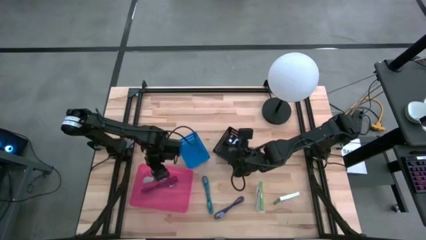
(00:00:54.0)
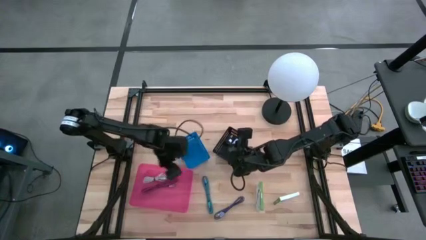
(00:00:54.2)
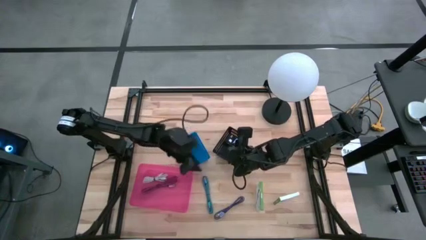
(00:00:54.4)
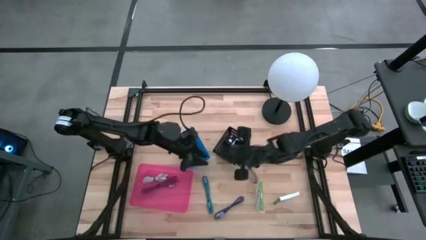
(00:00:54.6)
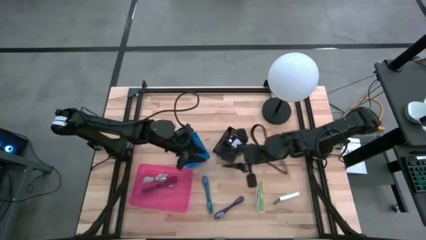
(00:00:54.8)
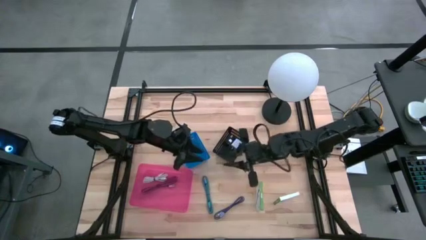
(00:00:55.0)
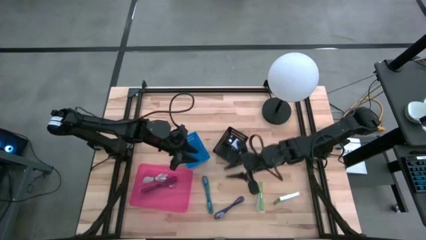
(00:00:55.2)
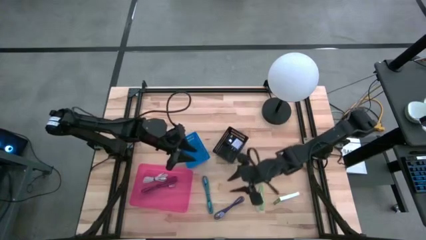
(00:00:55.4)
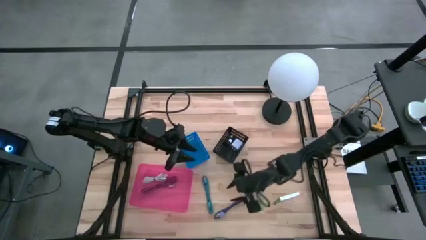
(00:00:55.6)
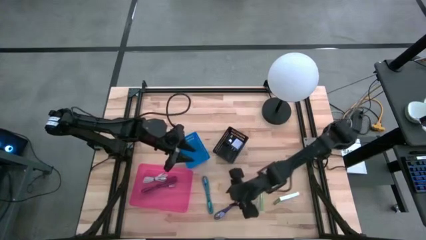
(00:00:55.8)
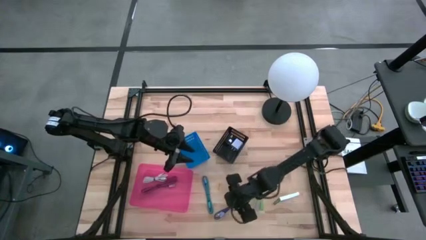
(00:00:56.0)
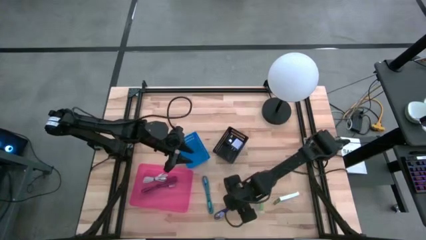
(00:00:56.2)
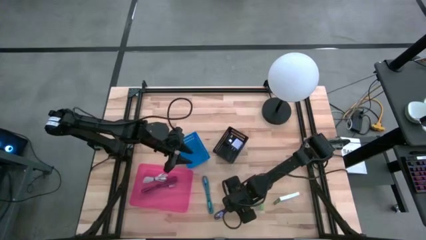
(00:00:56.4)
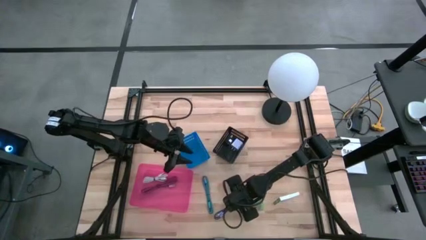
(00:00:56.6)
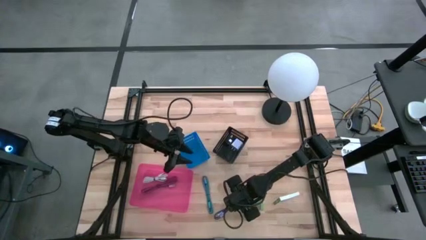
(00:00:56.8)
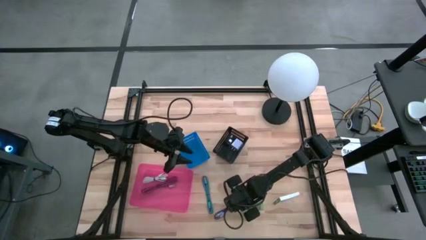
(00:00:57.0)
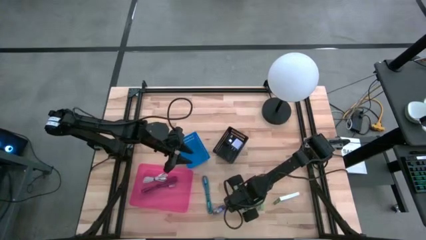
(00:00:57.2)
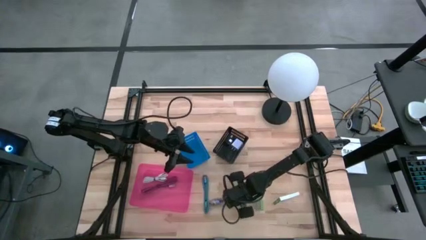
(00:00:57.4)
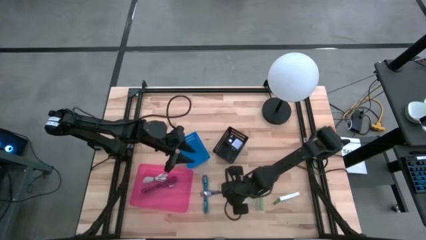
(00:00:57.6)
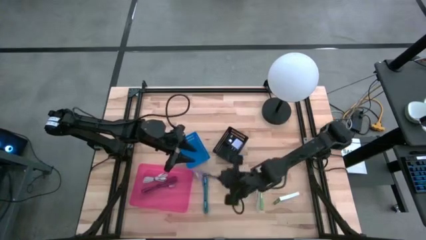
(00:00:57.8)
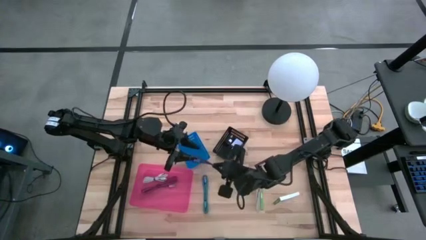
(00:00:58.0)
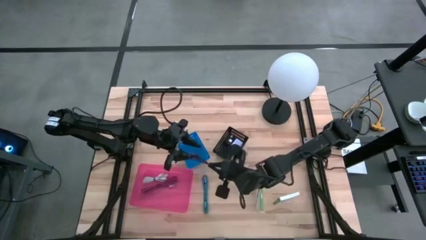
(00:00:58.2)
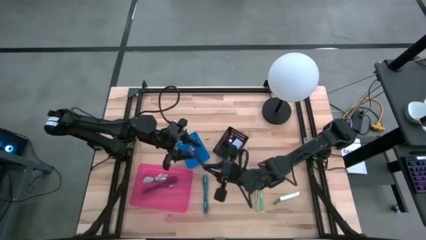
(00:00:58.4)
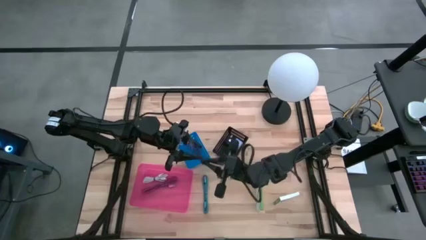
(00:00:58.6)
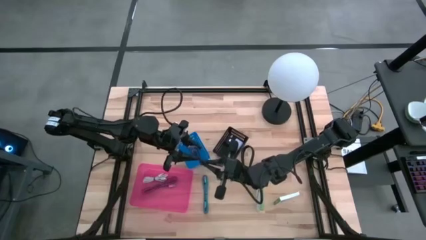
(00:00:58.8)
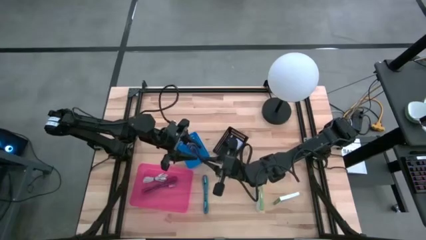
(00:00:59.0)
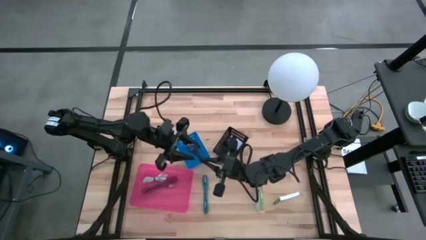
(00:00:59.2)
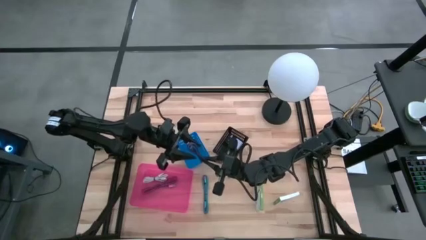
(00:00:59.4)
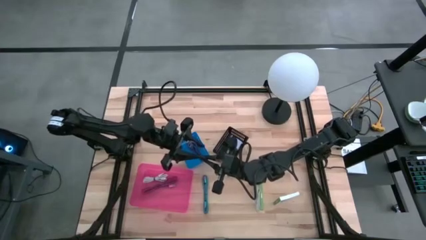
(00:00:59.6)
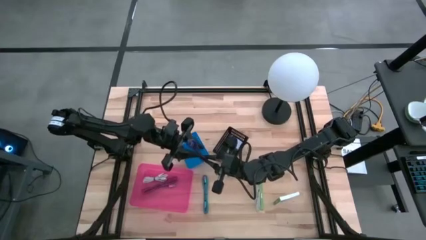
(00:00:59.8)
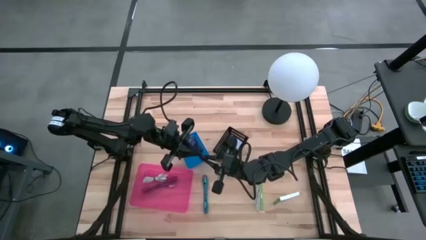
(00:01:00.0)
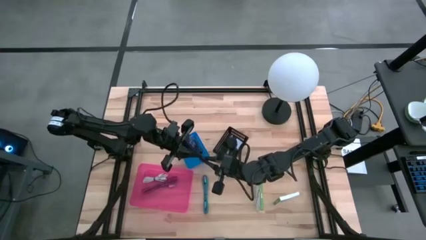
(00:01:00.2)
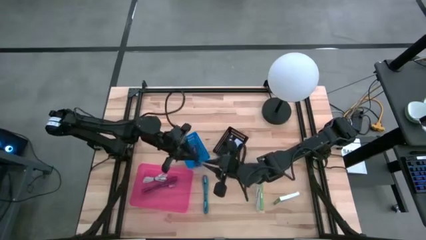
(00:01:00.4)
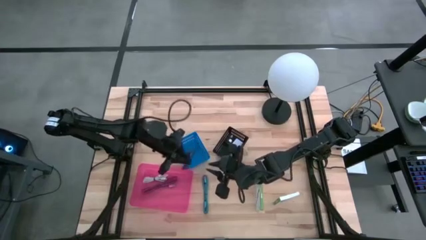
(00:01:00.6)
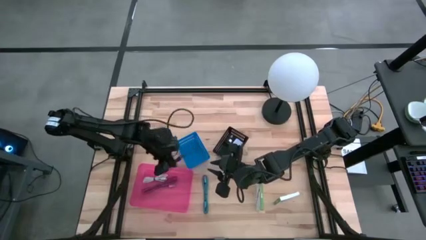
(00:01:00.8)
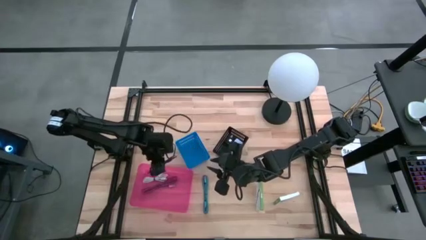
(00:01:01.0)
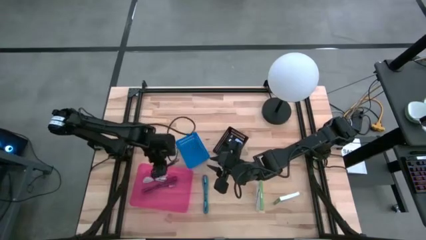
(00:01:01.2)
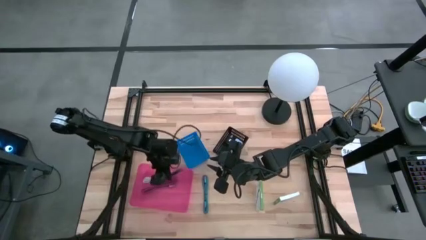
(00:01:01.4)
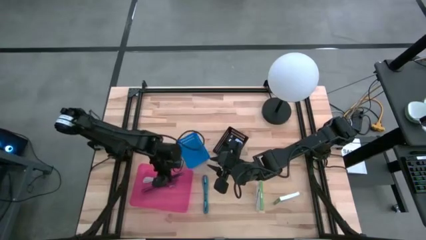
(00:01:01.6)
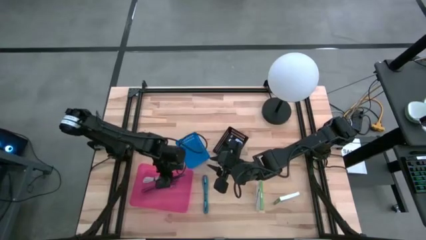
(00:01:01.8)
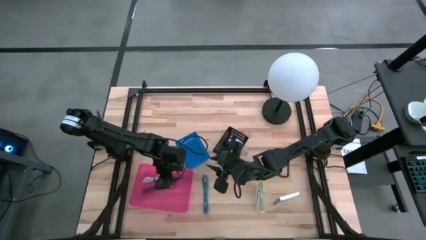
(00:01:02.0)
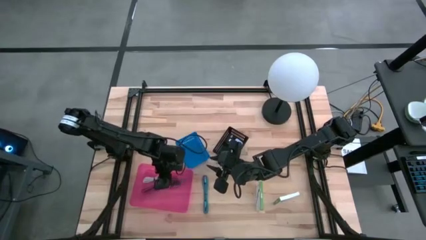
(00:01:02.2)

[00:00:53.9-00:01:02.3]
Task: Pick and place items into bin
Put the black and violet charger cable into the pink bin

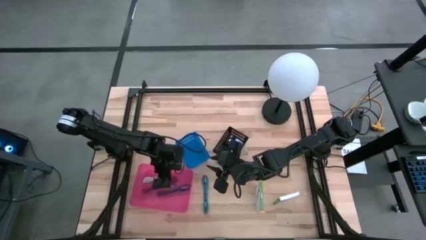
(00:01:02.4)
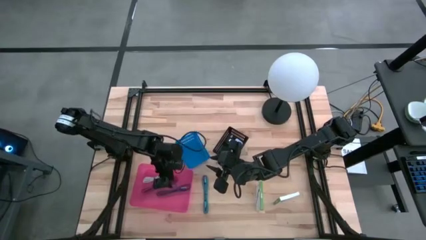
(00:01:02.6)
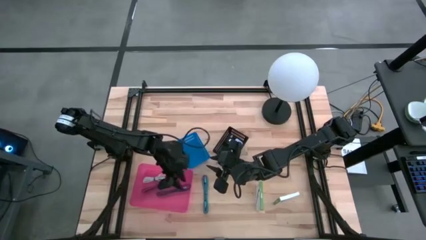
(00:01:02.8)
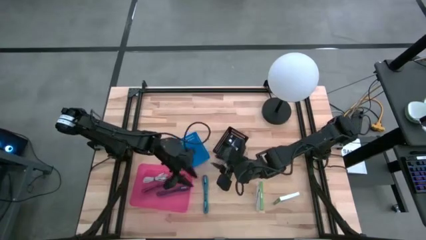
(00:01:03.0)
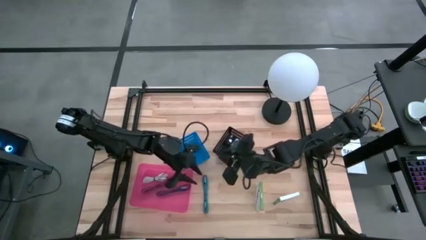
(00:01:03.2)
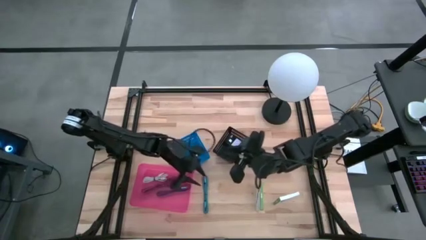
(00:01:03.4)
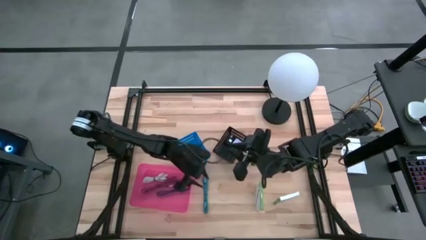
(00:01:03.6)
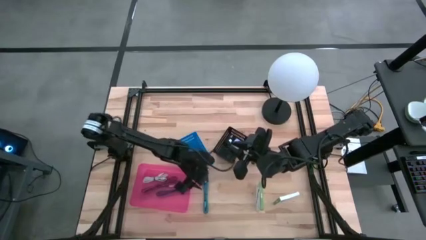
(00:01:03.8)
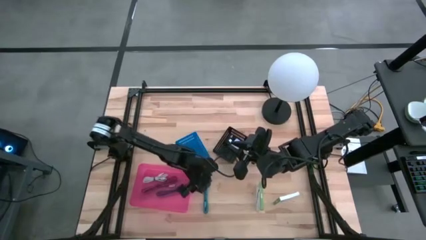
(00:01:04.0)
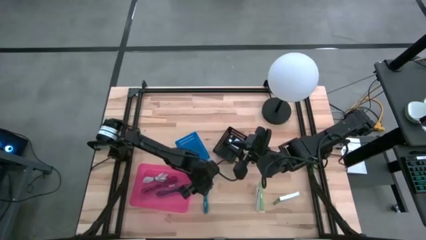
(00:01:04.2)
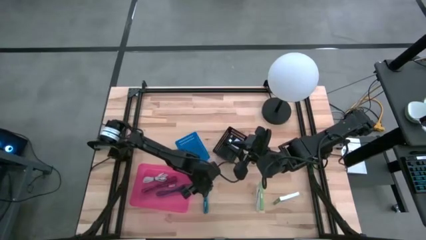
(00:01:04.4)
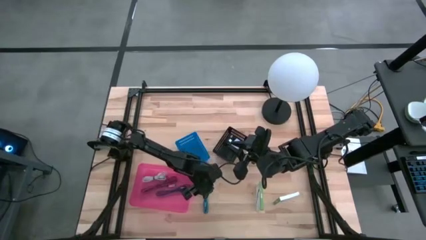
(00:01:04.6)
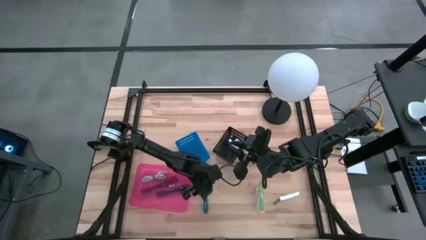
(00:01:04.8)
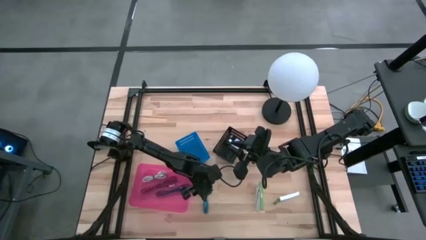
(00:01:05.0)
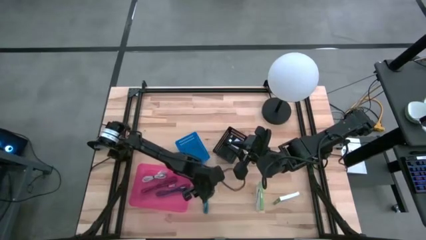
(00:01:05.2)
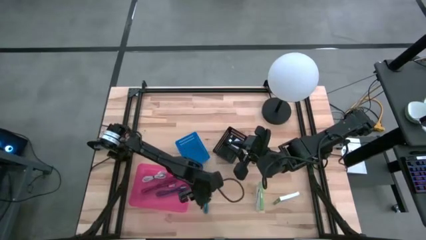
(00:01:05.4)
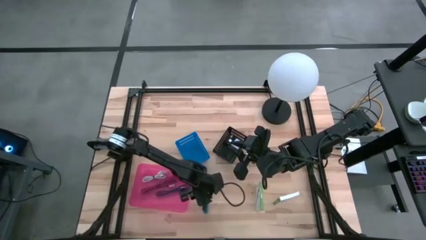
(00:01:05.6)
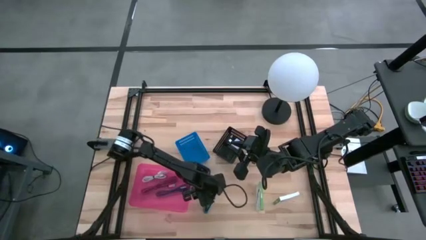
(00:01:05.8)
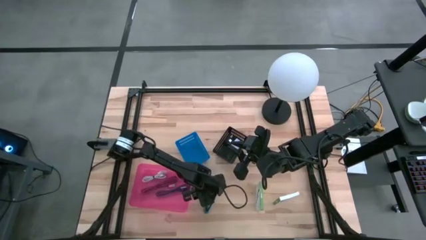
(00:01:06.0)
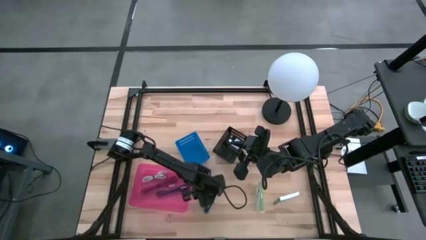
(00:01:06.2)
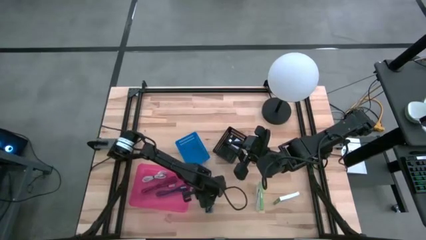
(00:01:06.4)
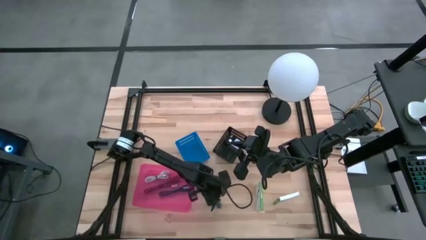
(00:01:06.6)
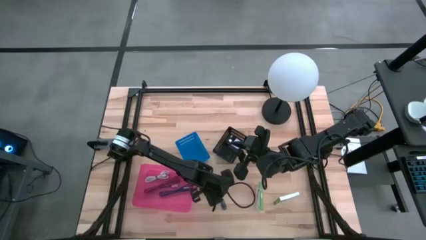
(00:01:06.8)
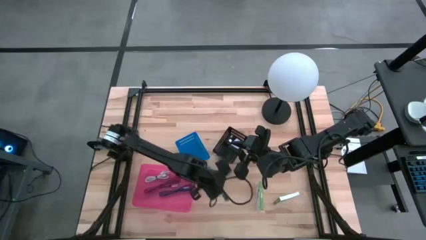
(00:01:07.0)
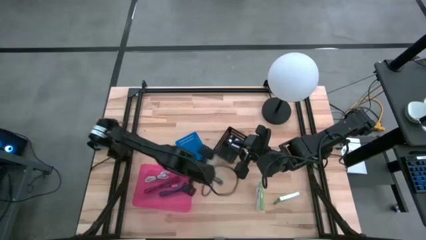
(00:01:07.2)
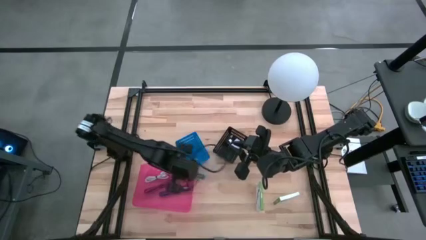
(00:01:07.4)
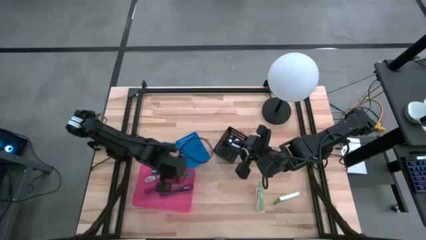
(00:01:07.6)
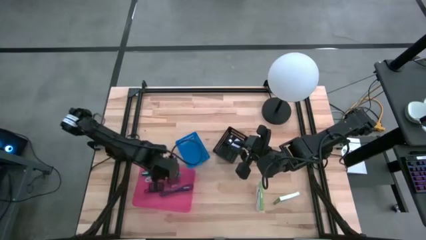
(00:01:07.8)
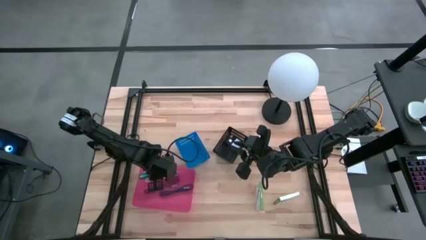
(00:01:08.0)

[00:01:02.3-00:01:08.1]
Put the blue and black charger cable into the pink bin
